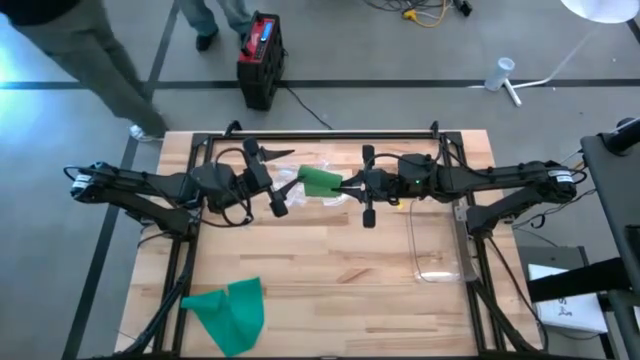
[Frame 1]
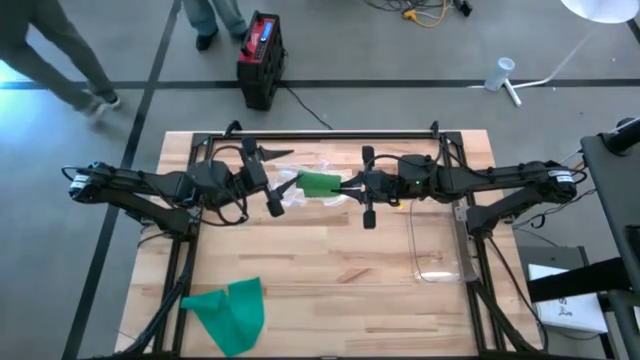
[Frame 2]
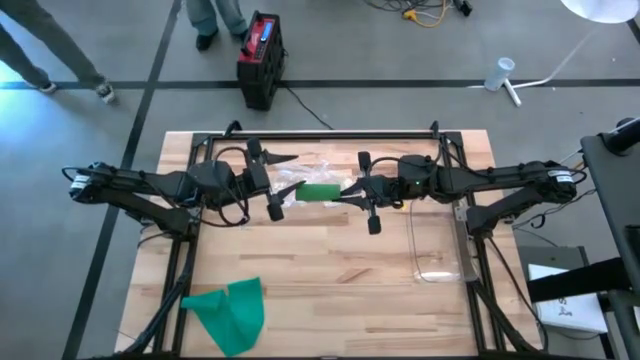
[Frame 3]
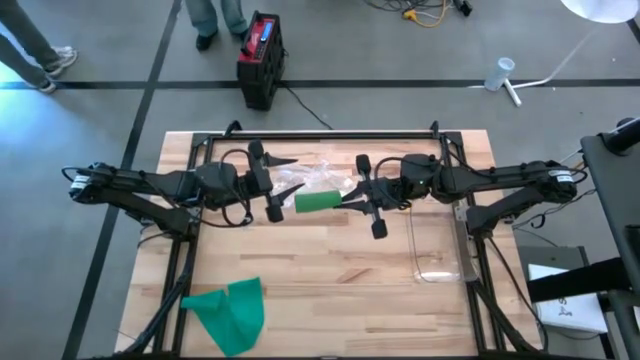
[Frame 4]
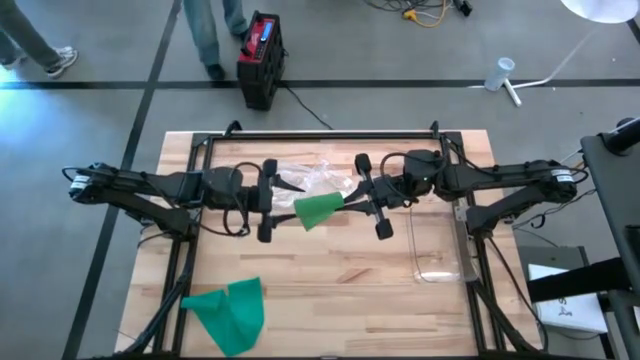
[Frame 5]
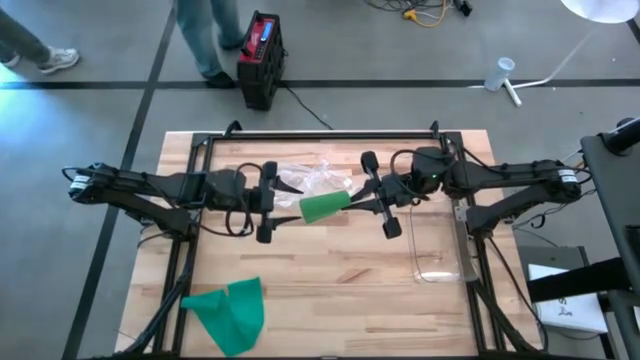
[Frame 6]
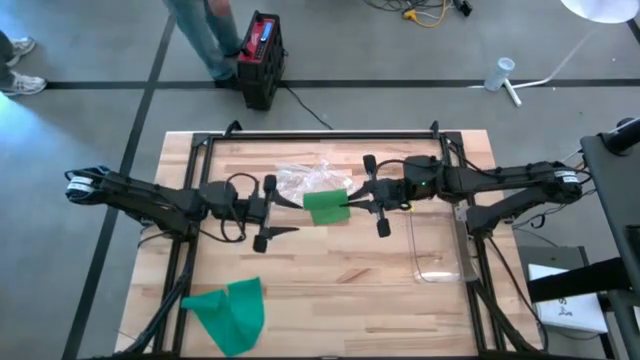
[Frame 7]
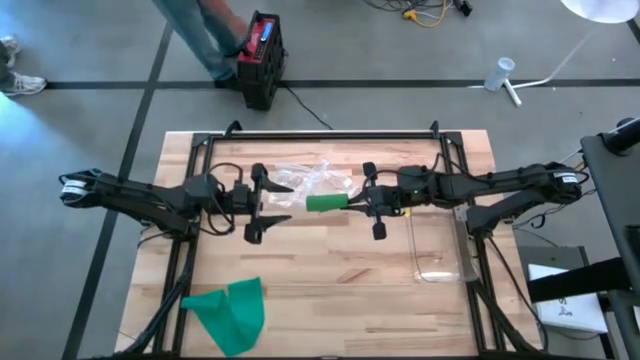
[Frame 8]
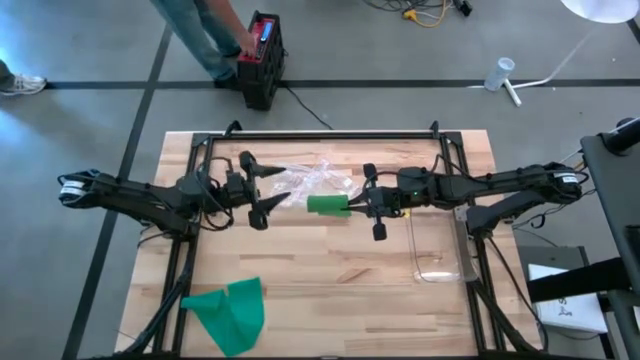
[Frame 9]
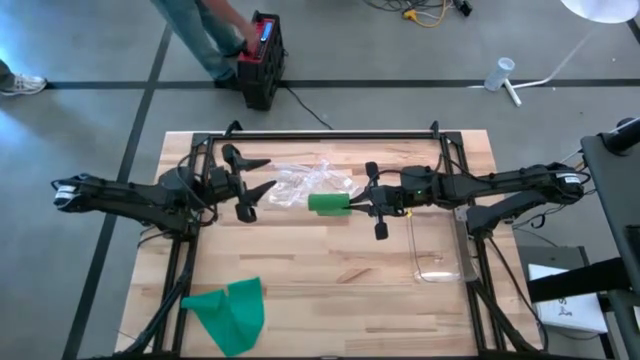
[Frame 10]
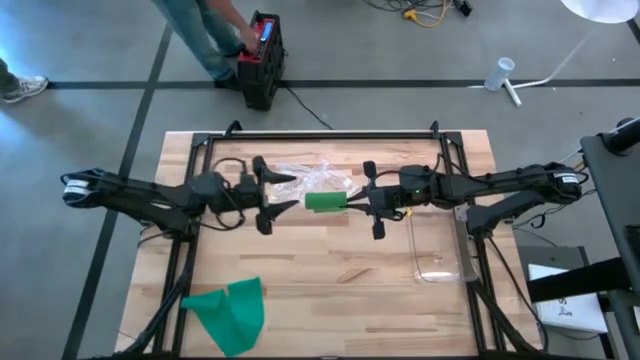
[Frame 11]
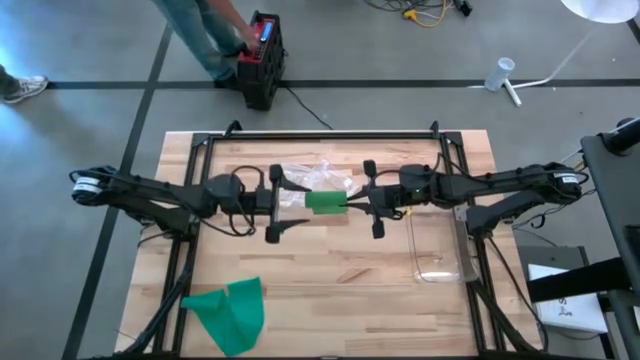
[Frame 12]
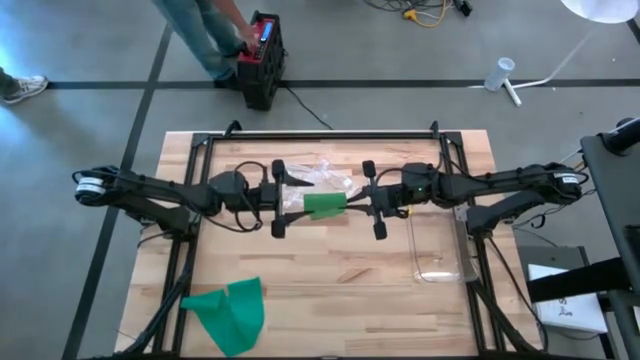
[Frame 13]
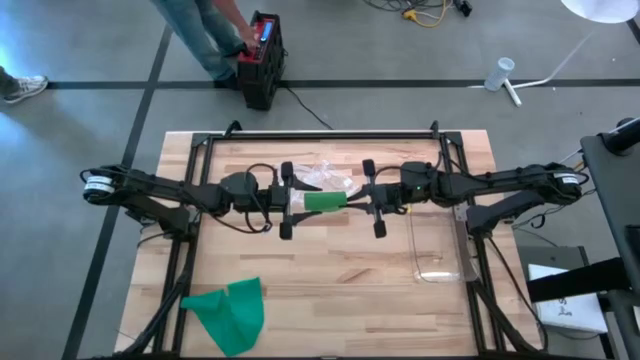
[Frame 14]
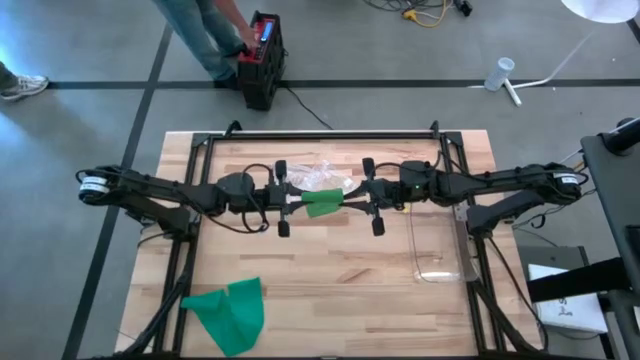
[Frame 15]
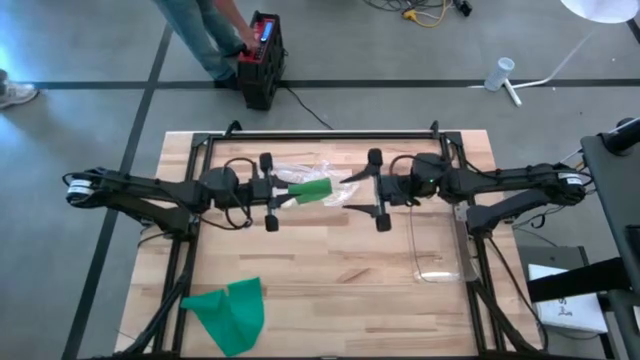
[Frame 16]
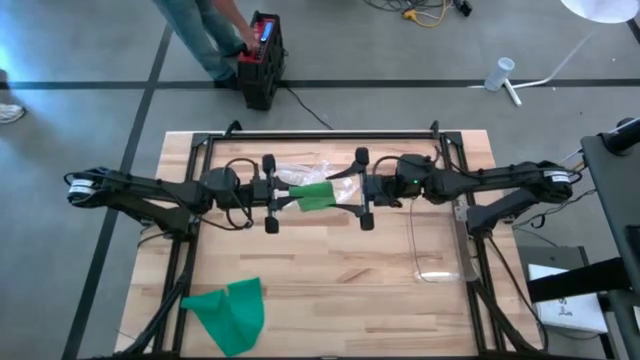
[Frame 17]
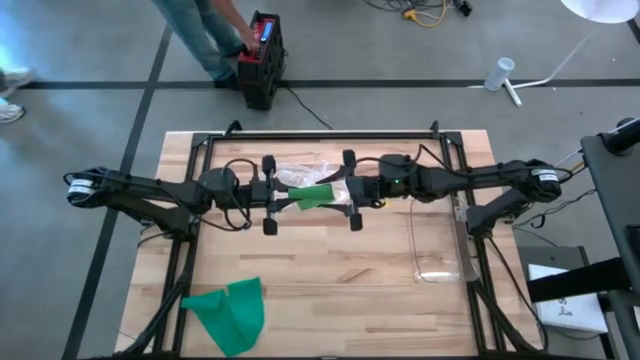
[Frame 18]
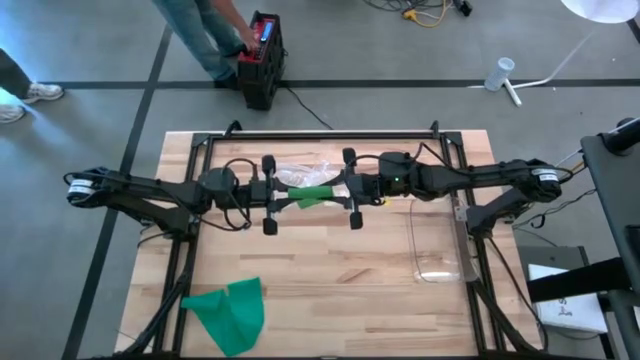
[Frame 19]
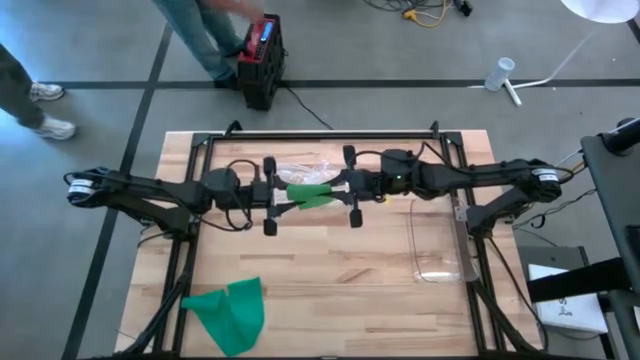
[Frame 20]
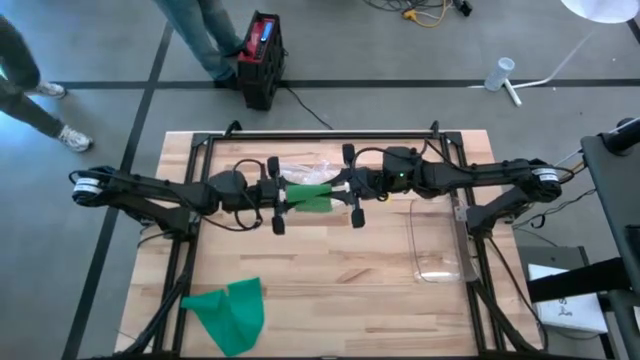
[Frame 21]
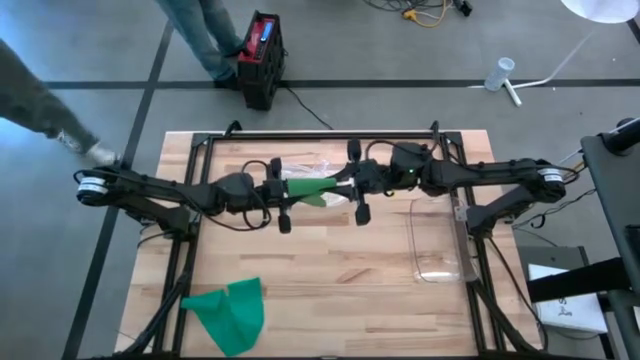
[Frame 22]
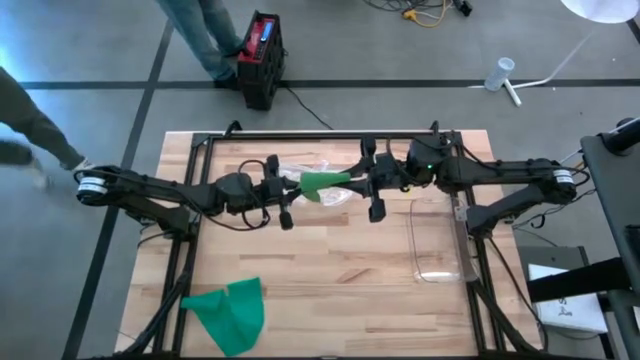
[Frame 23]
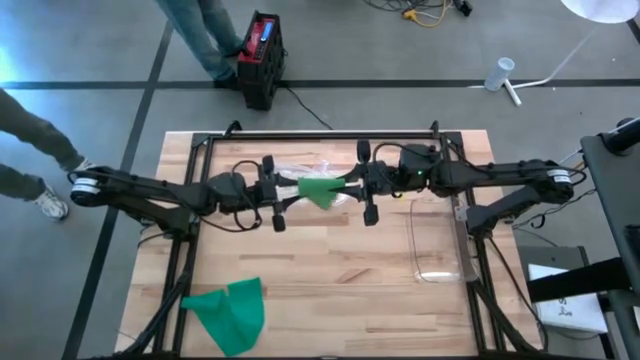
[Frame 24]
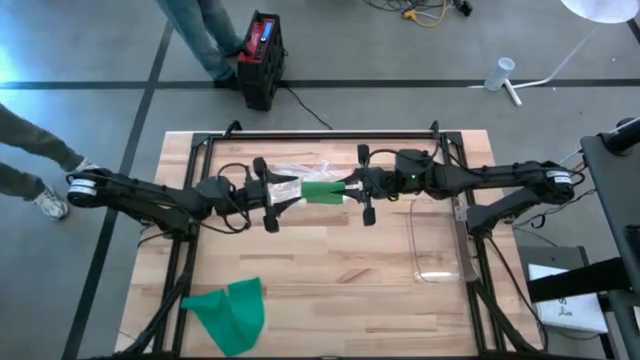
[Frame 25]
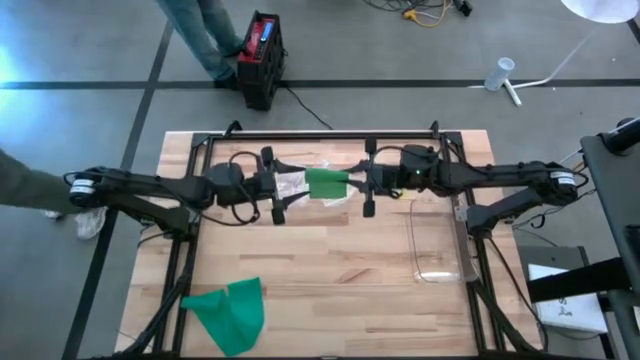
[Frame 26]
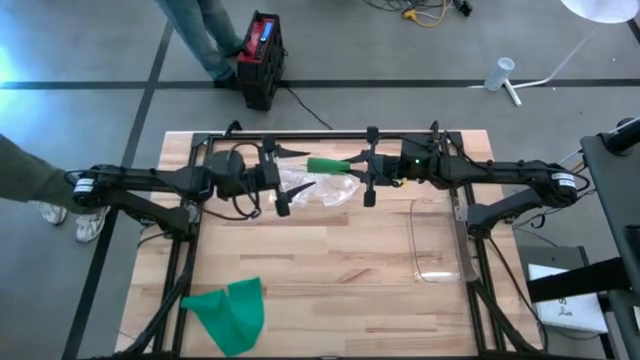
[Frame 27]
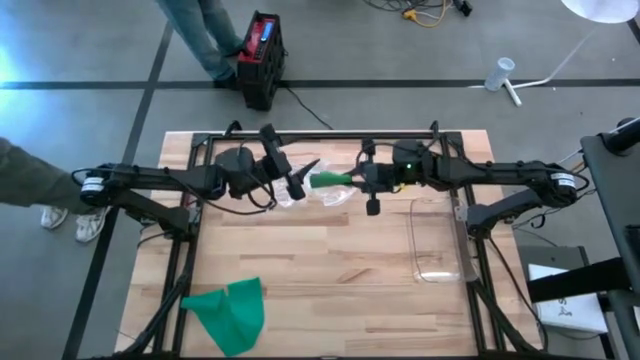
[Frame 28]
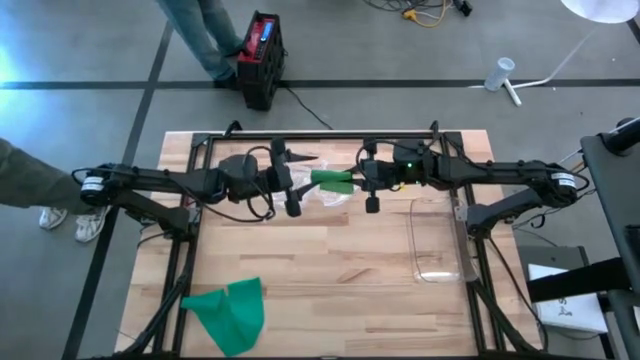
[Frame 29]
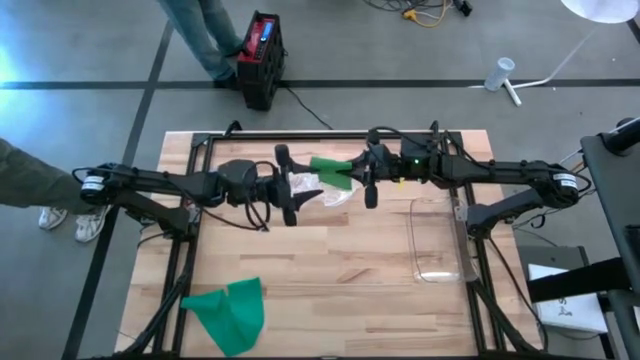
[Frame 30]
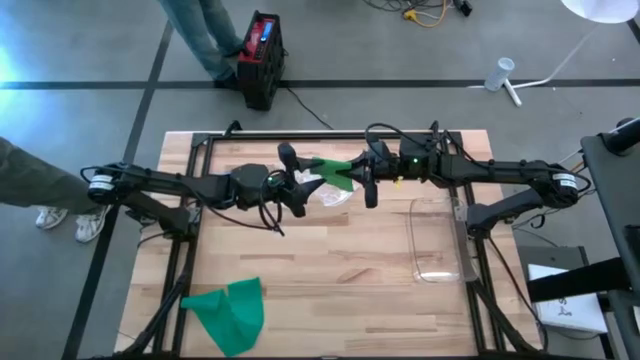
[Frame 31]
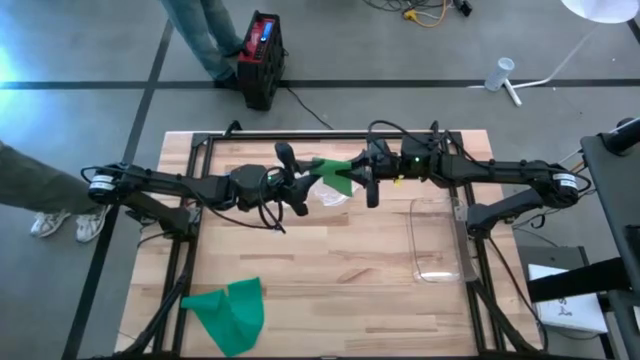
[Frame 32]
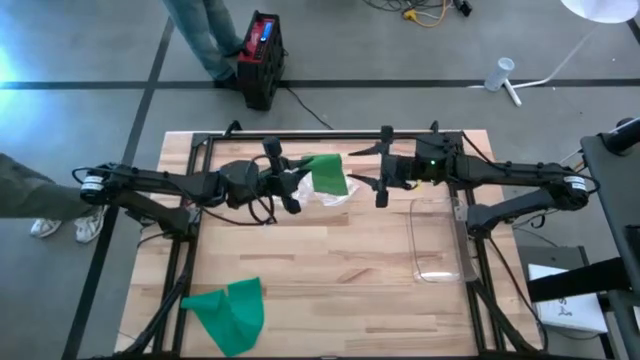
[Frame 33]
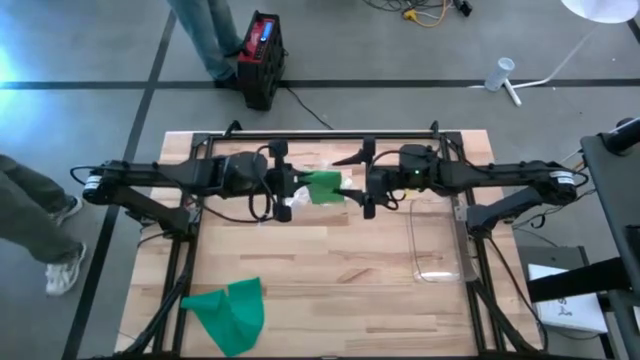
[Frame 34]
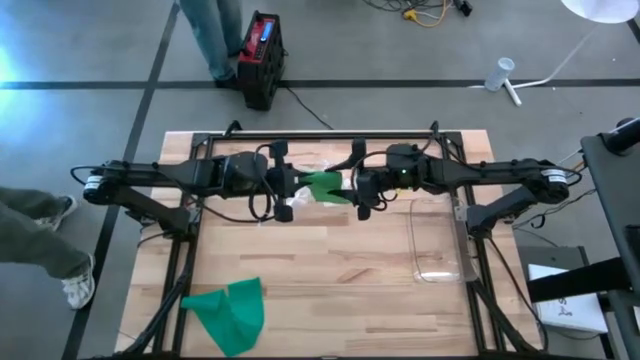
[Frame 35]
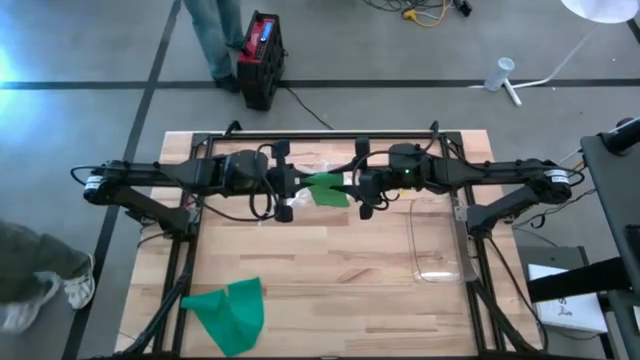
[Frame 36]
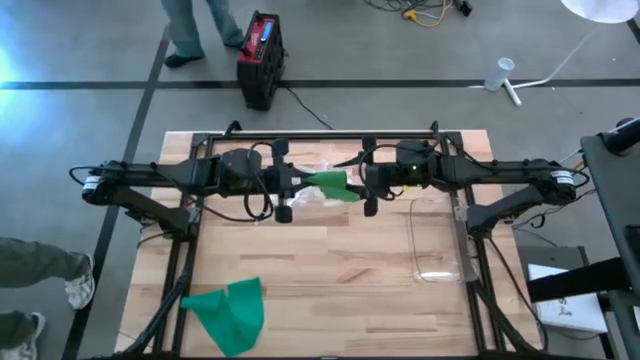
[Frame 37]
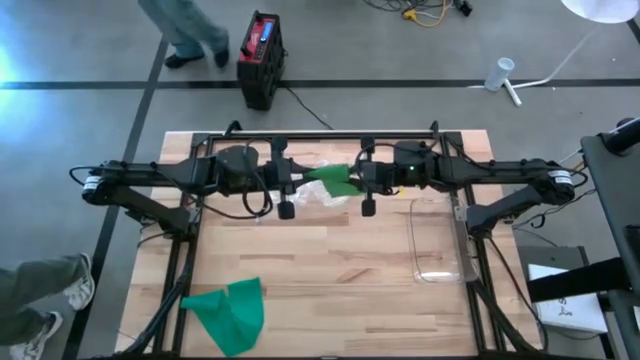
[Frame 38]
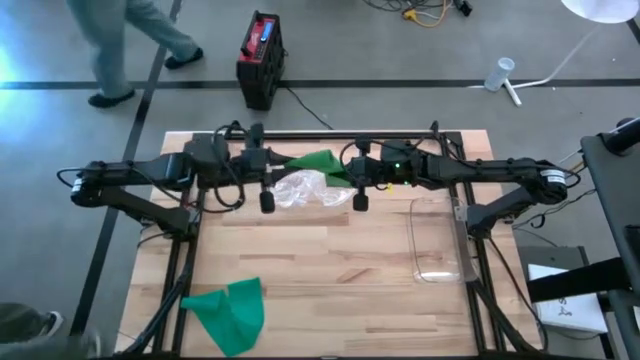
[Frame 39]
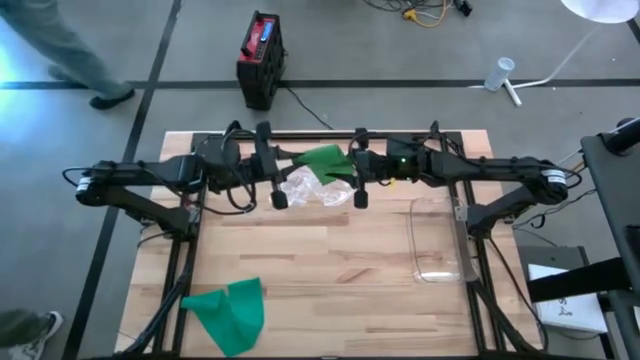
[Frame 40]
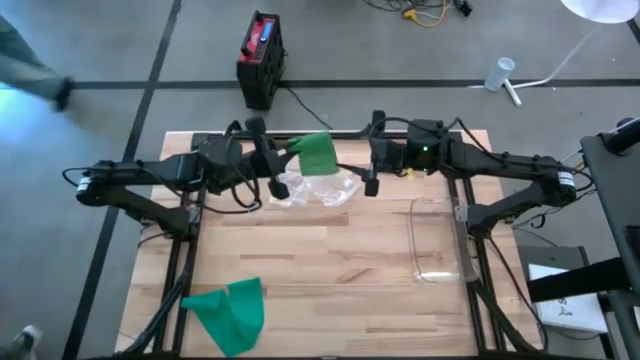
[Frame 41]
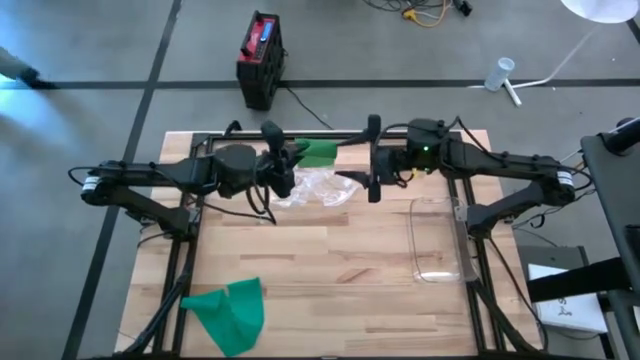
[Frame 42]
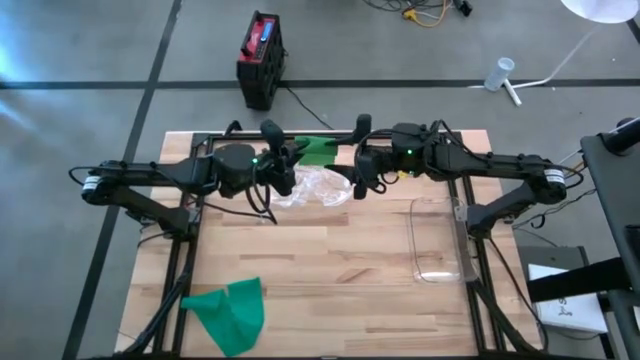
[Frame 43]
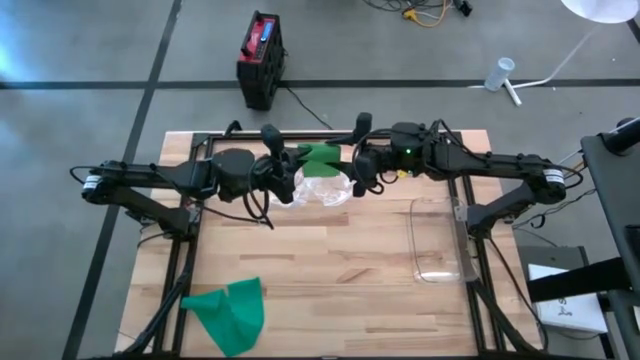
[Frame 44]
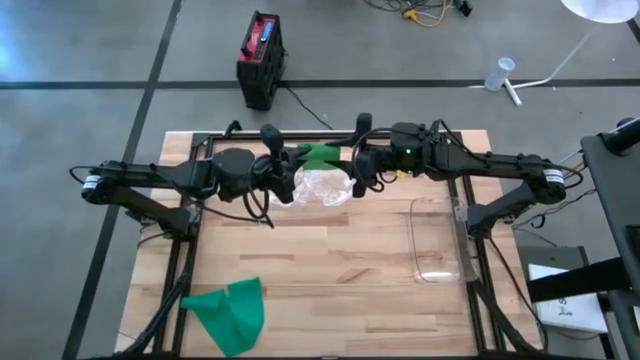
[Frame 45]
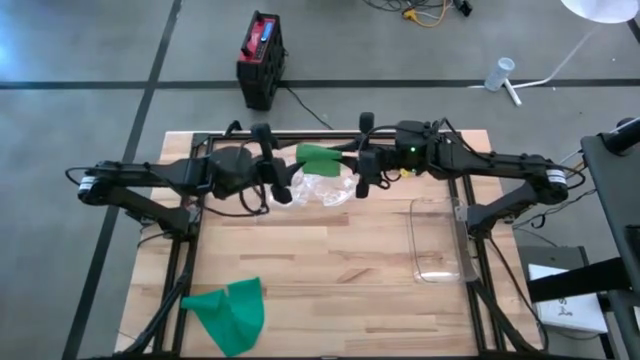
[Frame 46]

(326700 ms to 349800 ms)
Task: Roll bandage
Roll the green bandage
